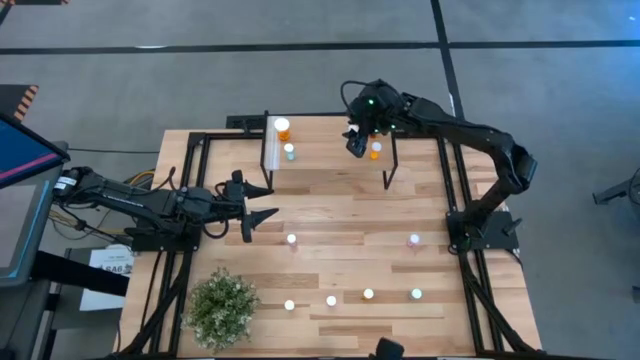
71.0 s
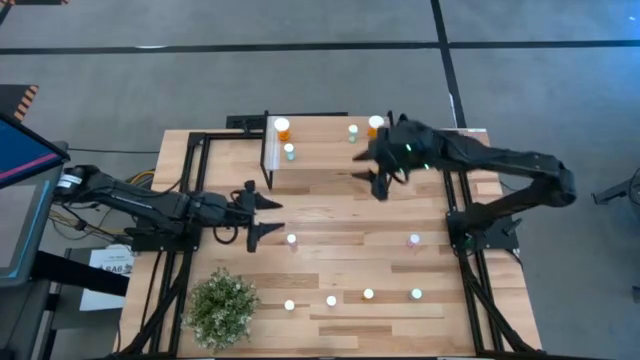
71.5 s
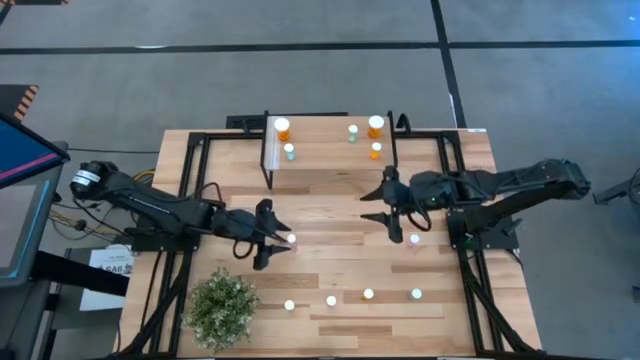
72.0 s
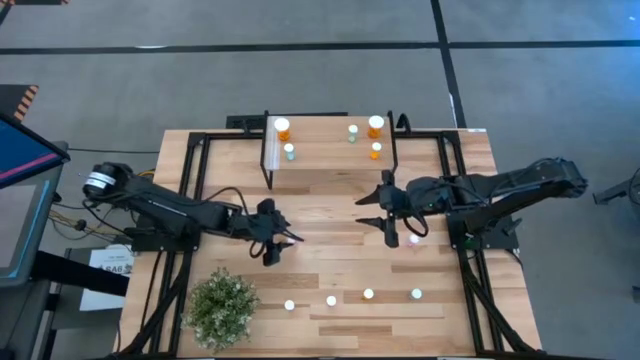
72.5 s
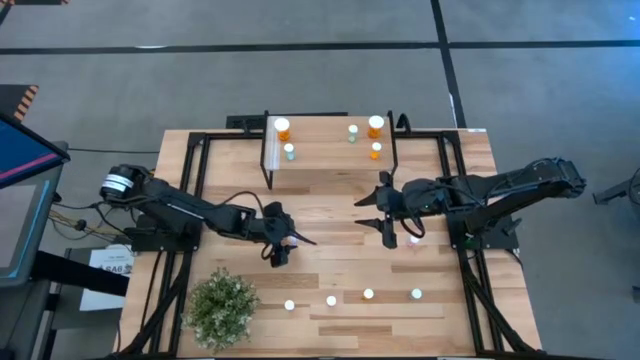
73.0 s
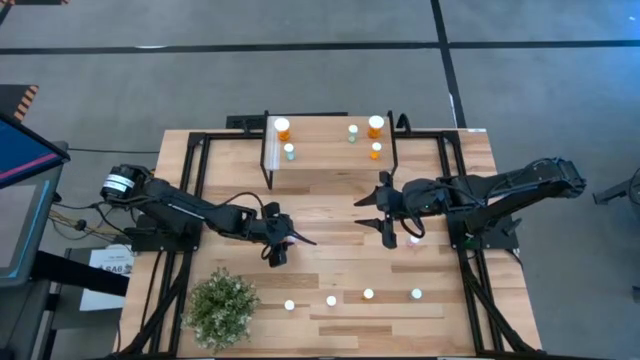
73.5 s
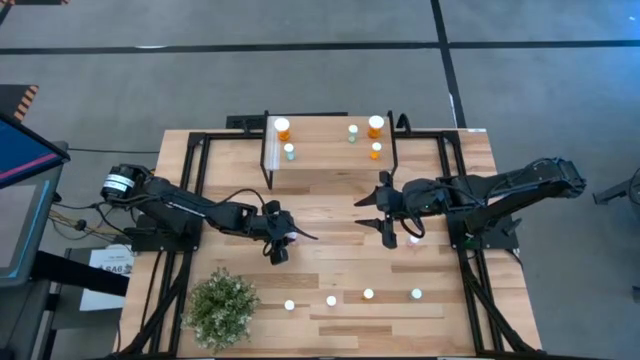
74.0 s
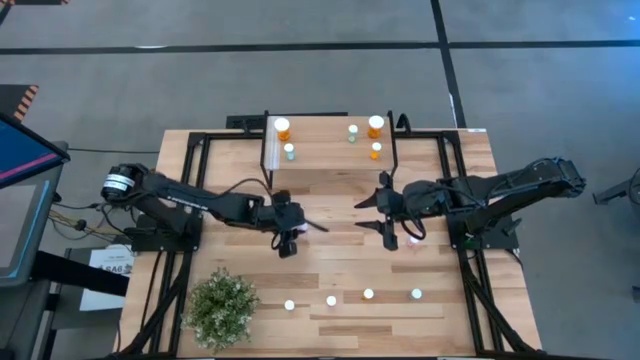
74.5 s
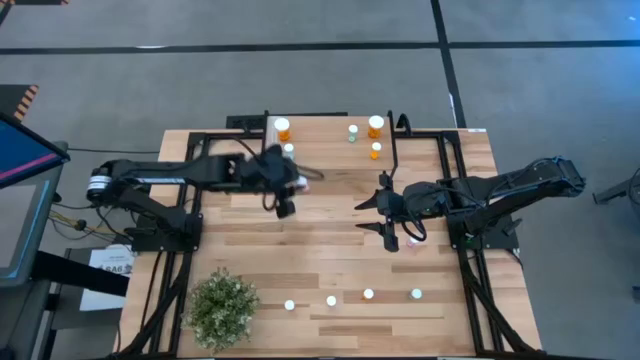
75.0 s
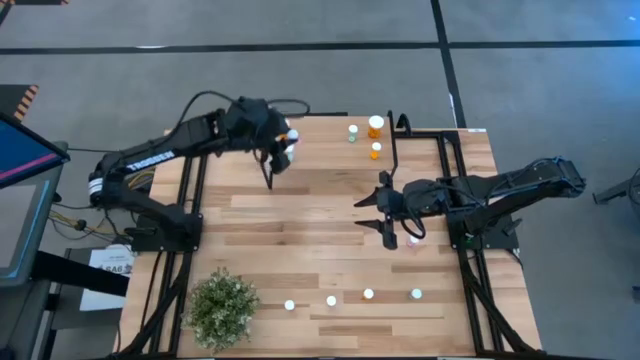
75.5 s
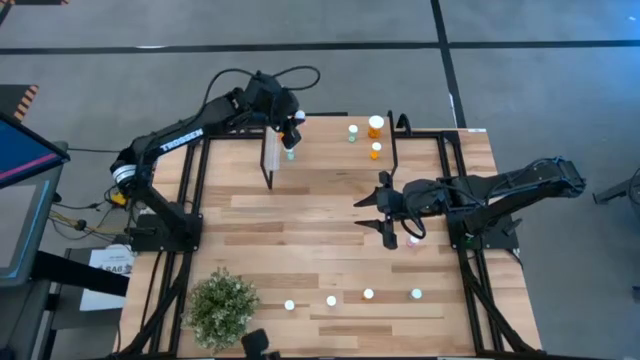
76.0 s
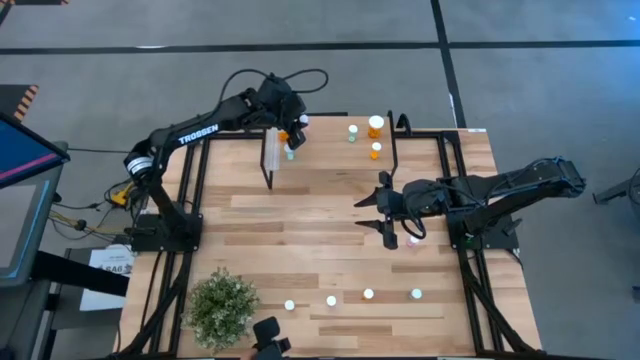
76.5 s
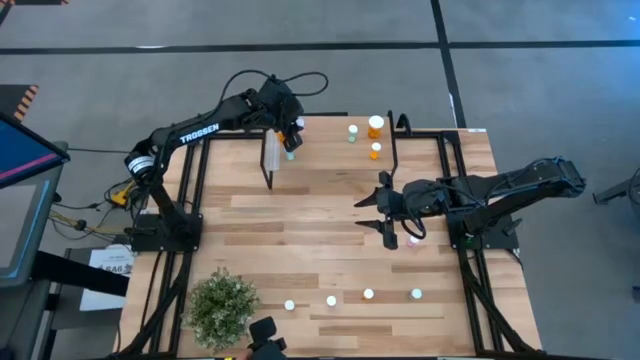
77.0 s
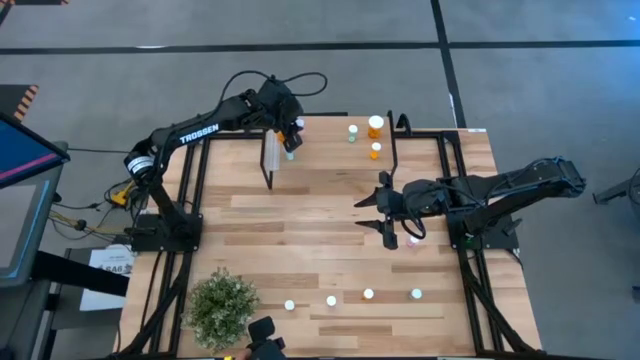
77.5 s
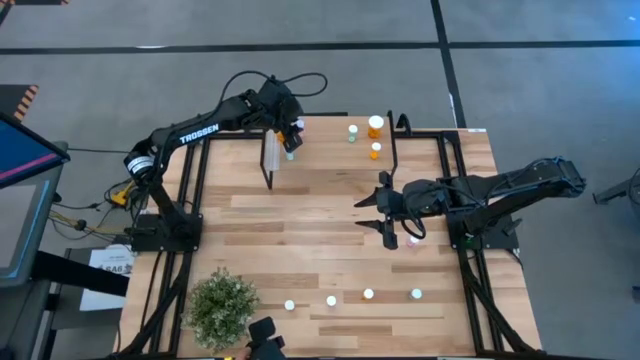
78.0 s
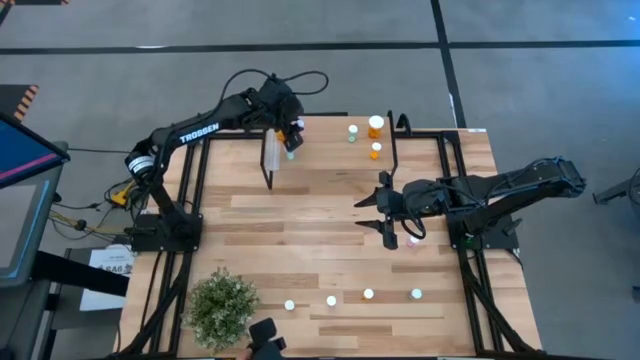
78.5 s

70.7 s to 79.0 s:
Task: Pick and place medicine bottles onto shelf by color
Put the pink pill bottle on the shelf

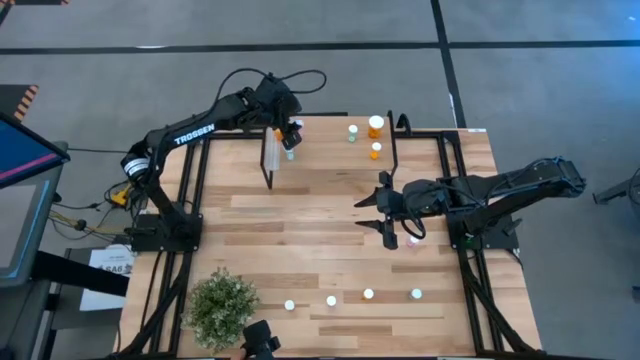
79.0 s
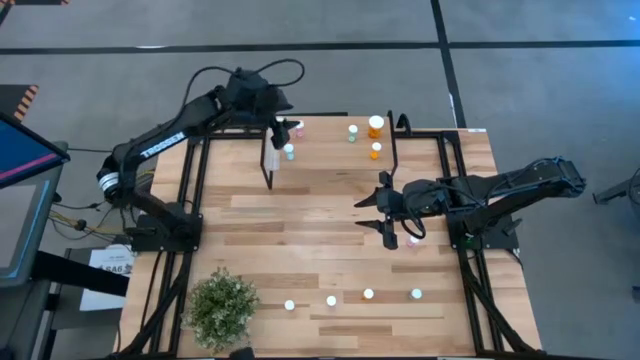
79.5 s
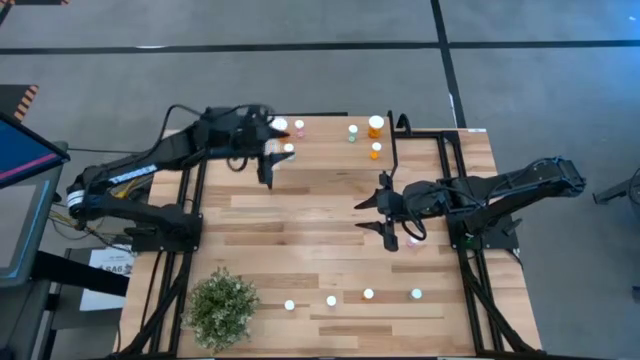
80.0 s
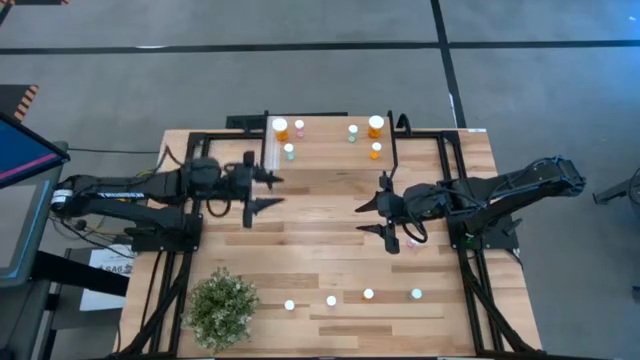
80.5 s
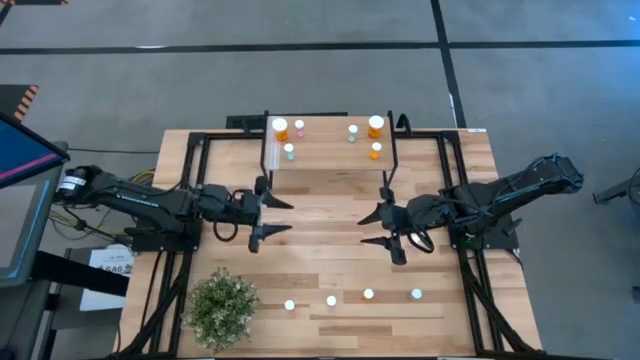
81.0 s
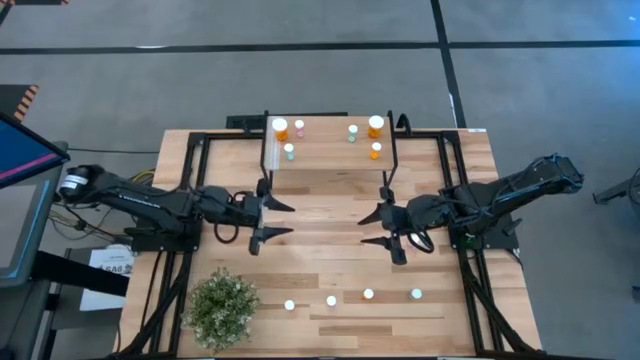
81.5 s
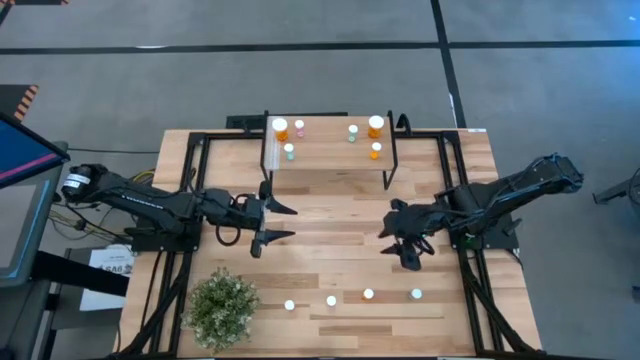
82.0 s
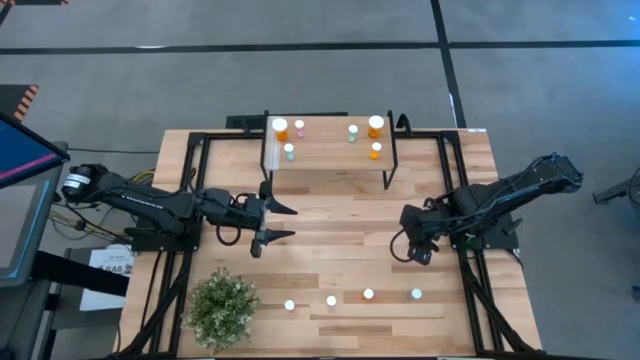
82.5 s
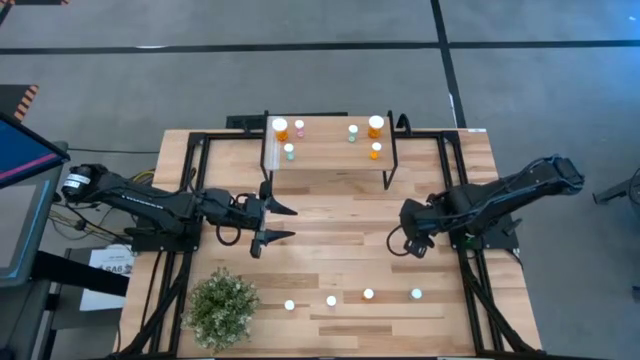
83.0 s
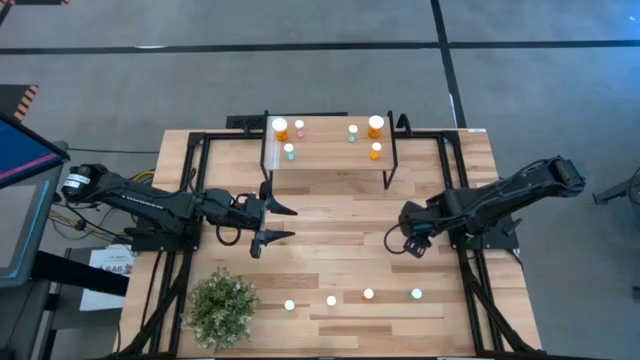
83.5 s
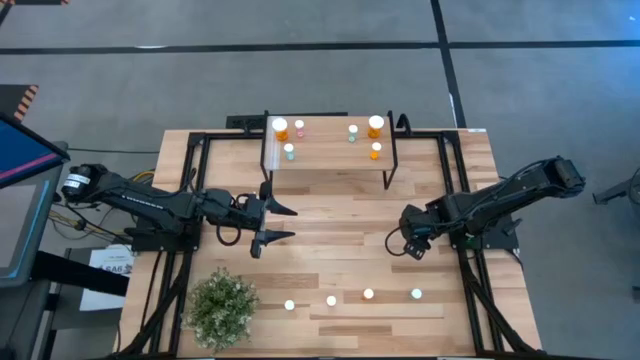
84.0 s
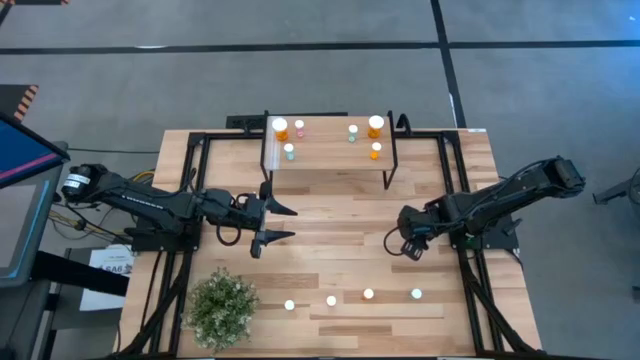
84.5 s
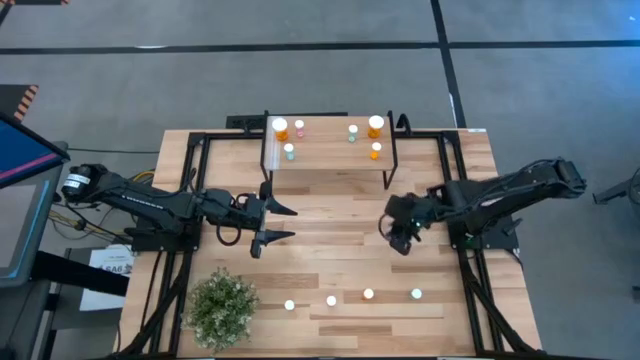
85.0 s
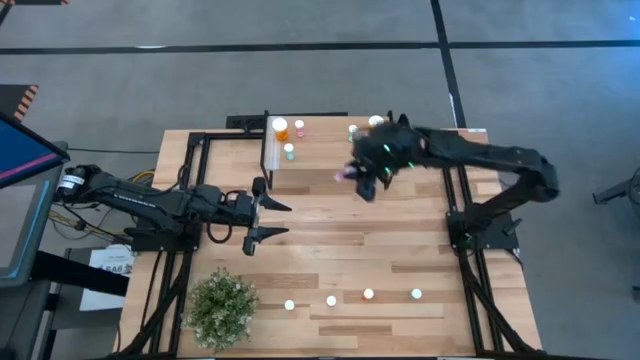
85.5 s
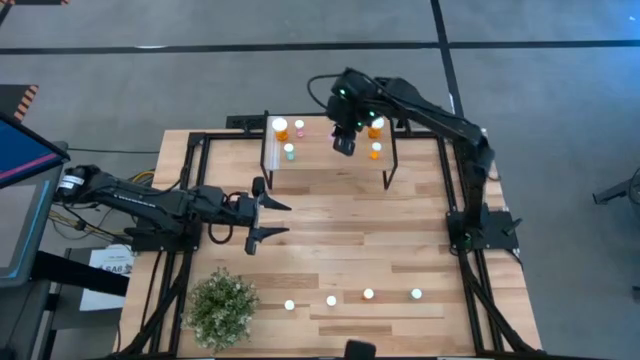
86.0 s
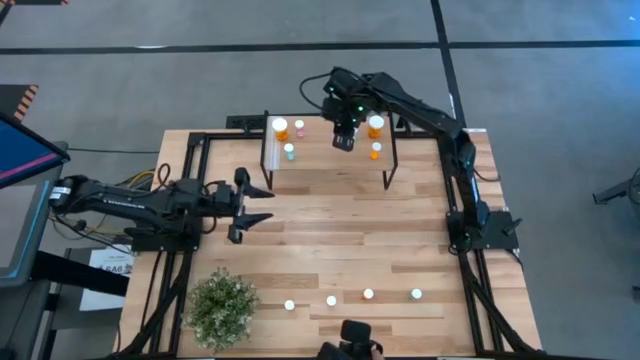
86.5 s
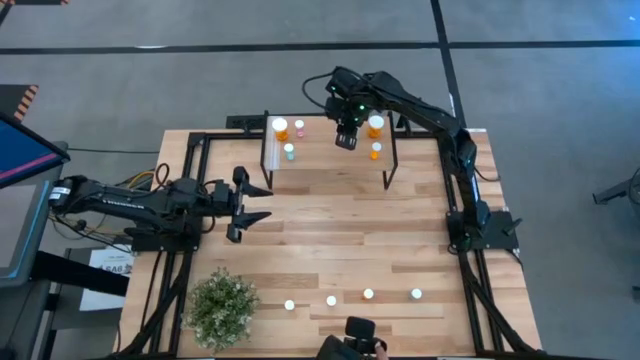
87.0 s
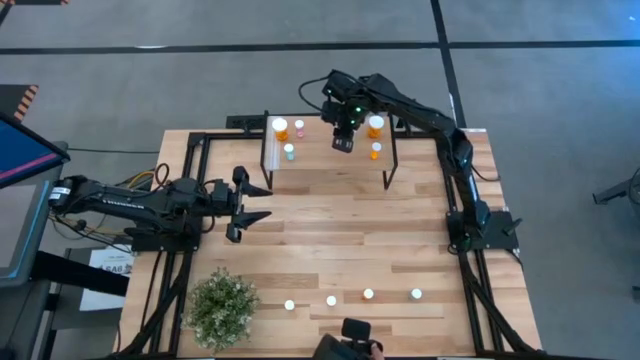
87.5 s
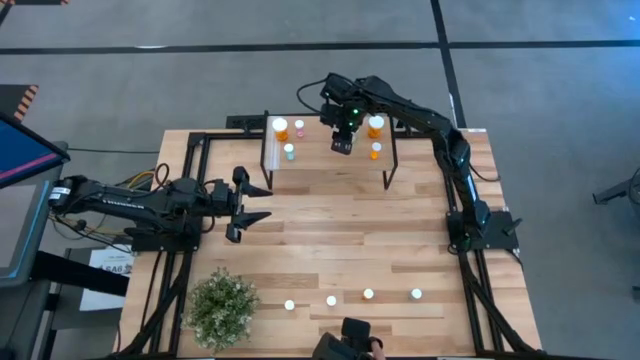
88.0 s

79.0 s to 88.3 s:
Put the pink pill bottle on the shelf

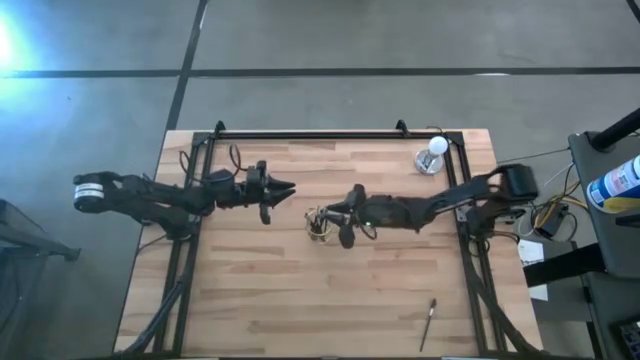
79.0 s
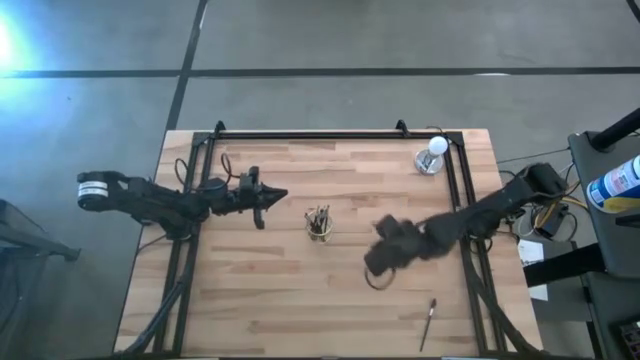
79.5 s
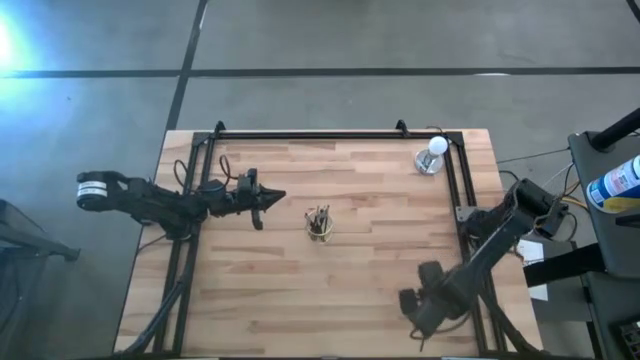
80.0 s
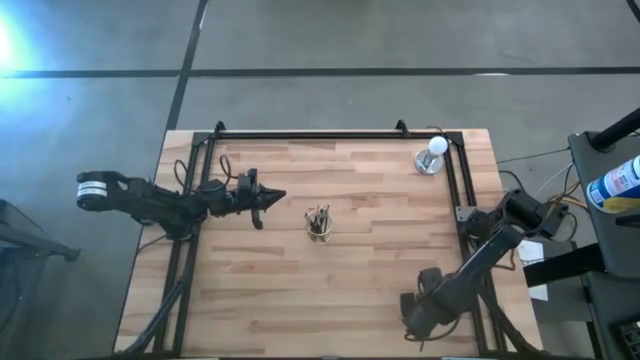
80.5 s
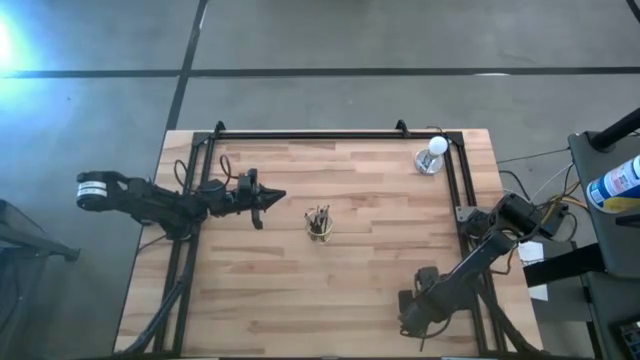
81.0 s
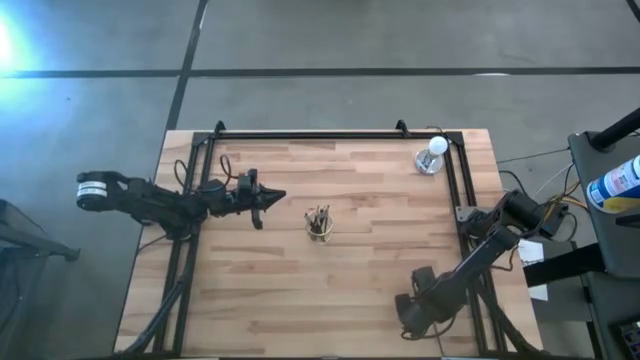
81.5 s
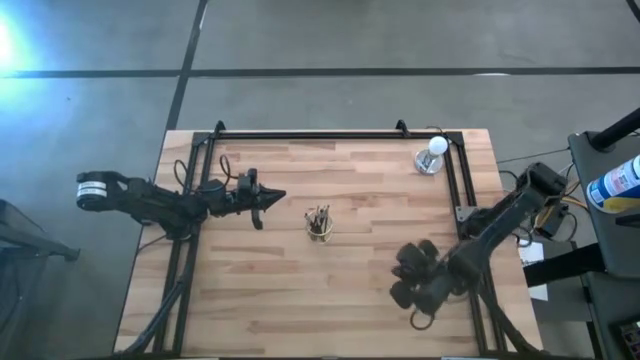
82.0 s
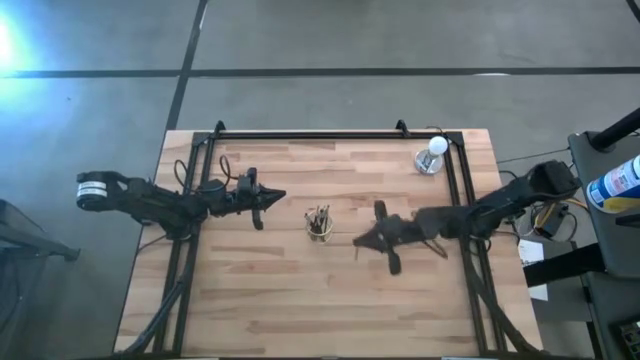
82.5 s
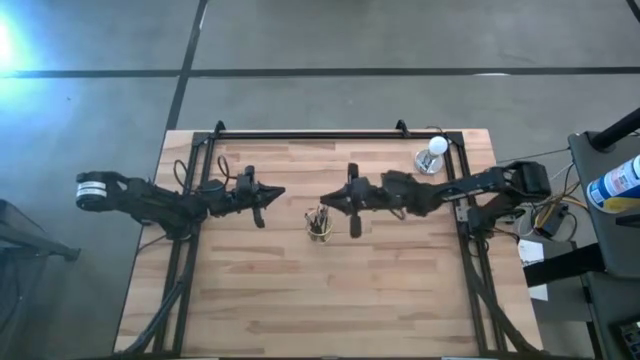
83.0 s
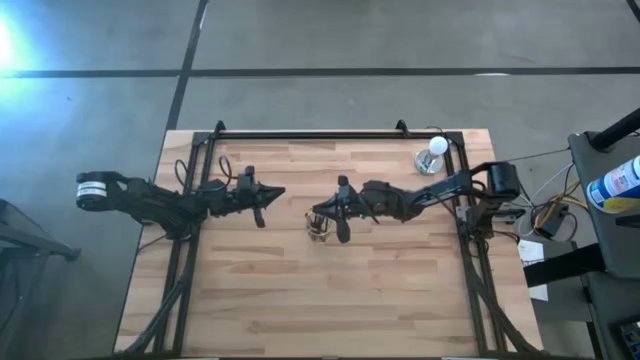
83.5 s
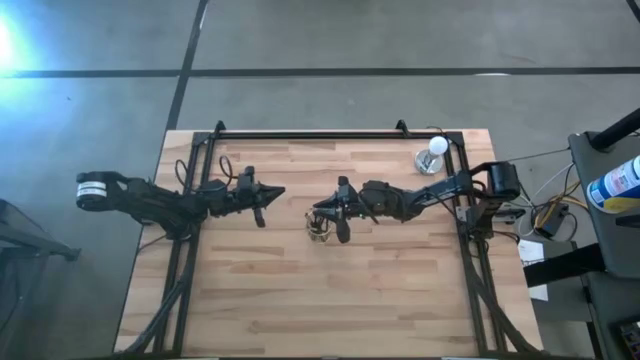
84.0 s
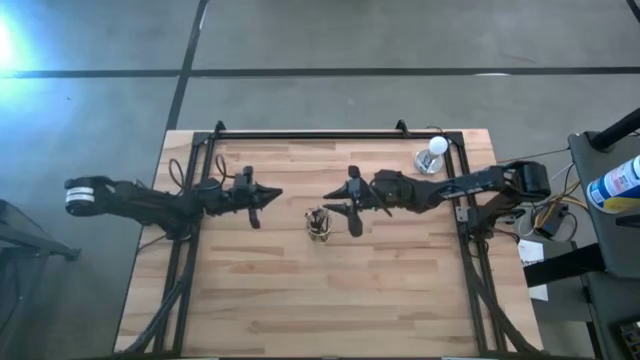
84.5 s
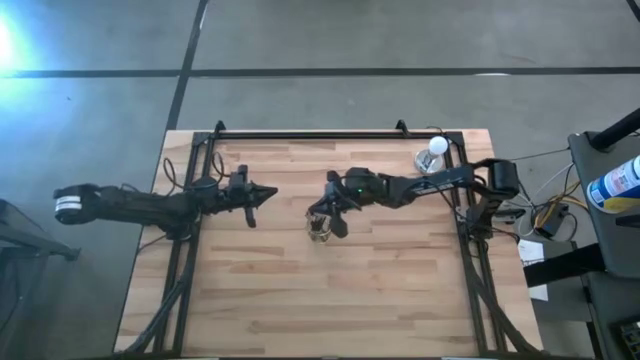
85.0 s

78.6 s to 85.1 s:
Task: Pick & Place Makeup Brushes
Put the brow brush into the gold makeup brush holder
